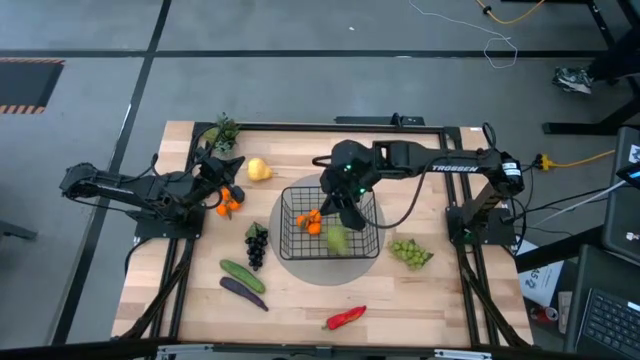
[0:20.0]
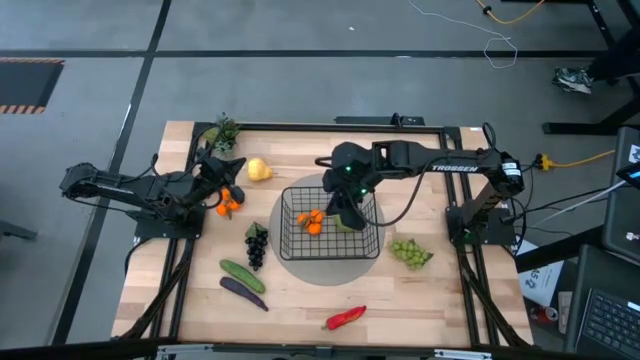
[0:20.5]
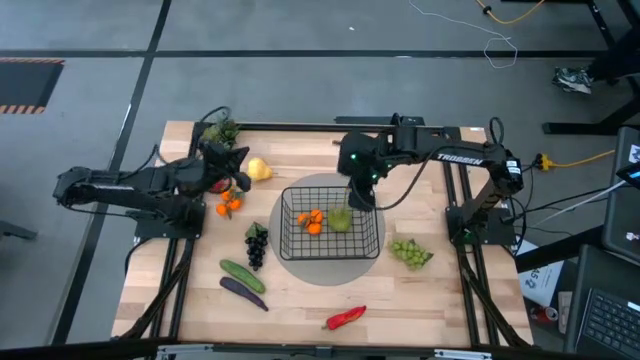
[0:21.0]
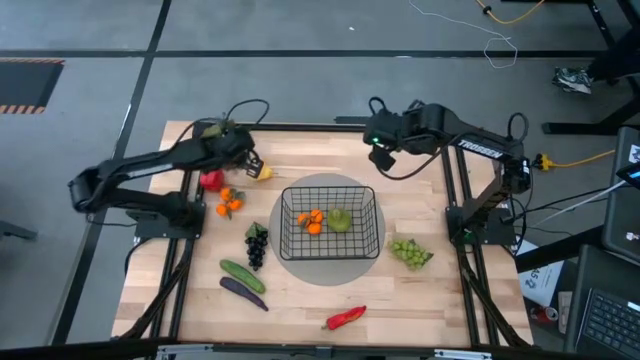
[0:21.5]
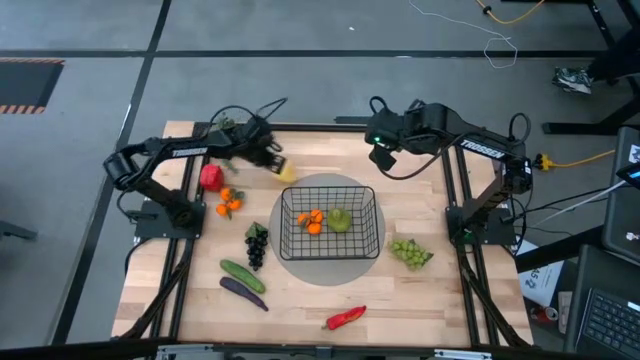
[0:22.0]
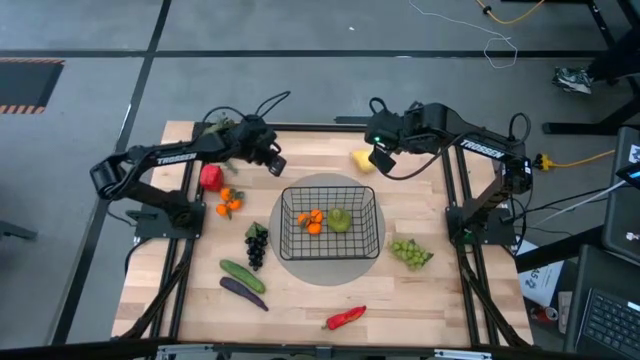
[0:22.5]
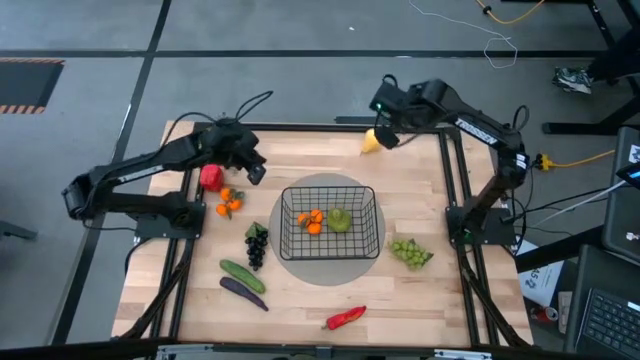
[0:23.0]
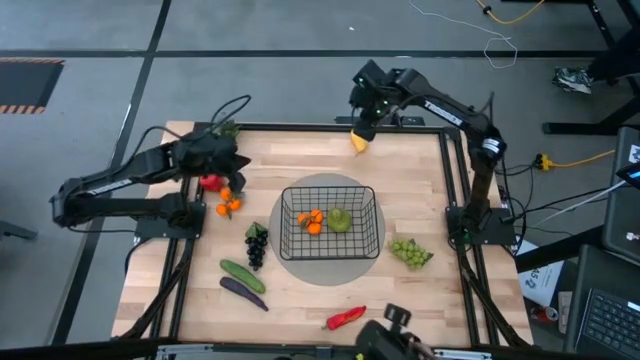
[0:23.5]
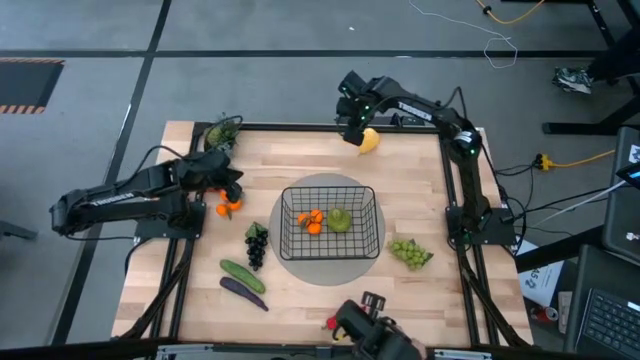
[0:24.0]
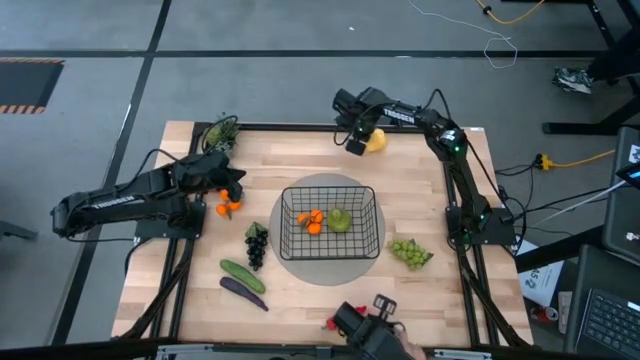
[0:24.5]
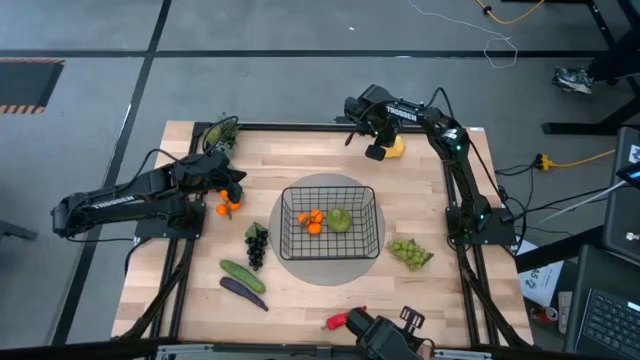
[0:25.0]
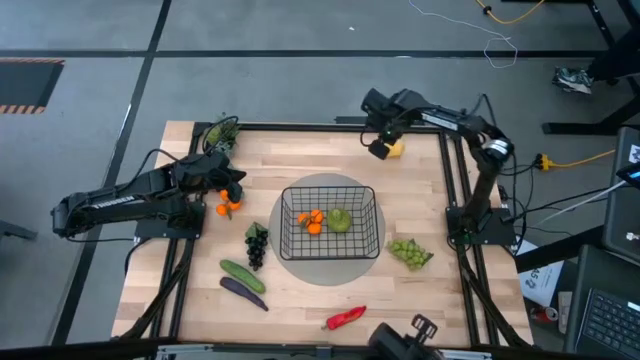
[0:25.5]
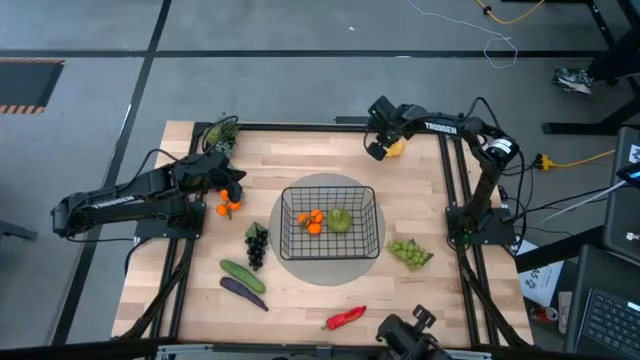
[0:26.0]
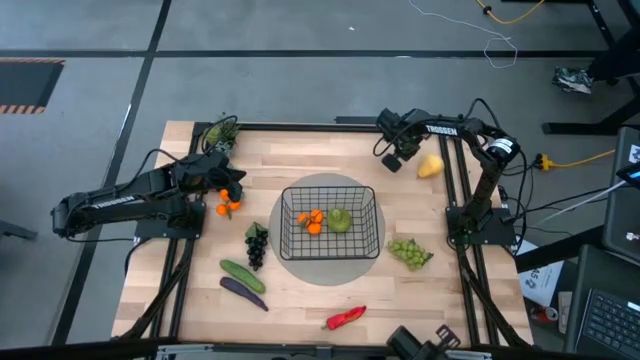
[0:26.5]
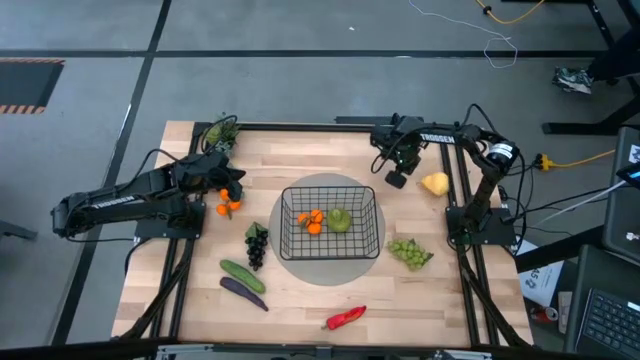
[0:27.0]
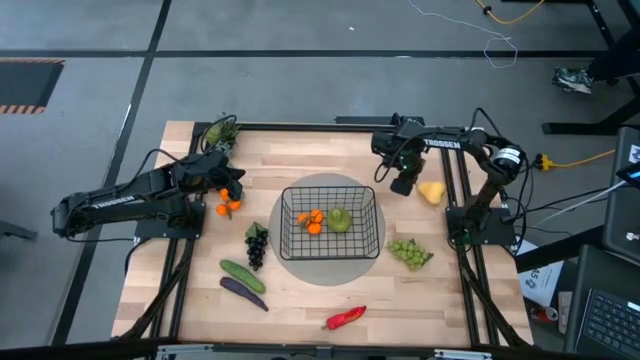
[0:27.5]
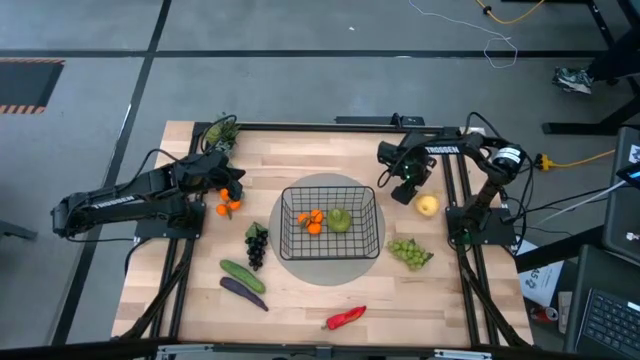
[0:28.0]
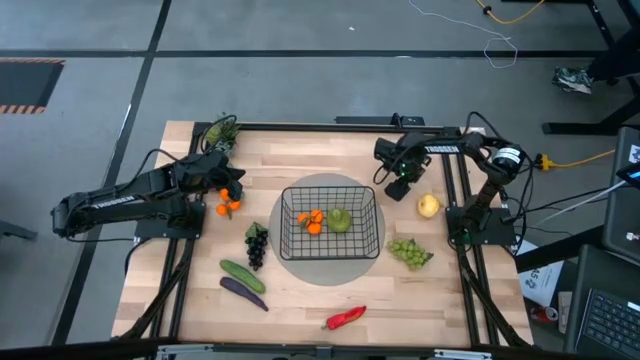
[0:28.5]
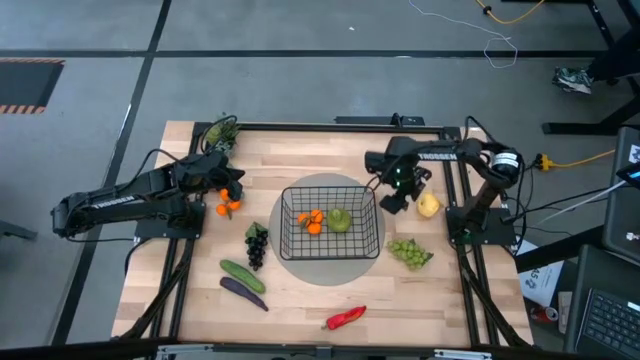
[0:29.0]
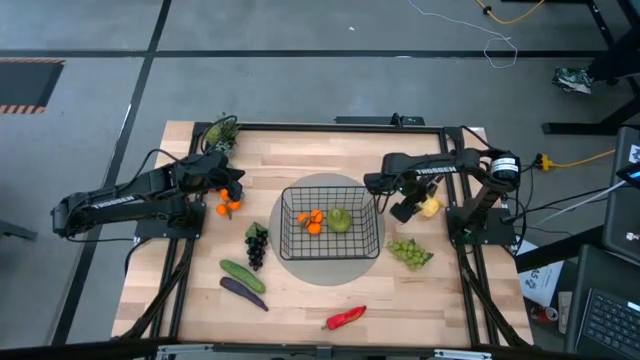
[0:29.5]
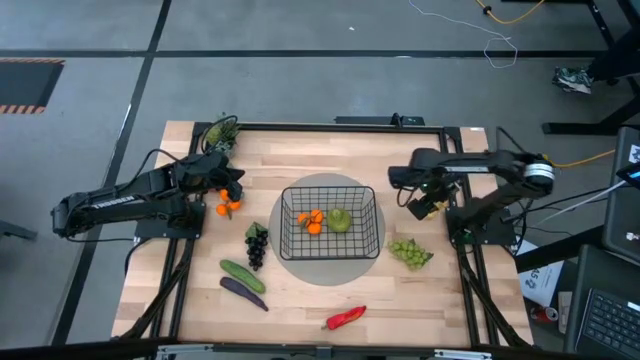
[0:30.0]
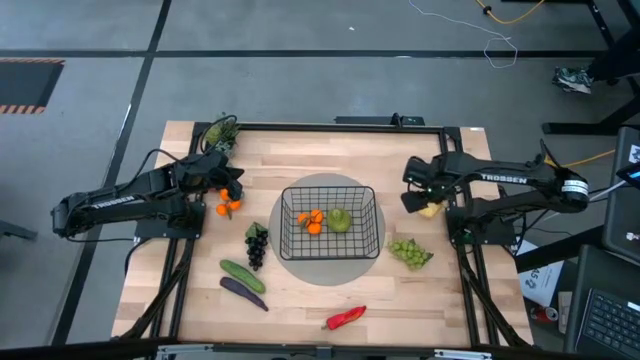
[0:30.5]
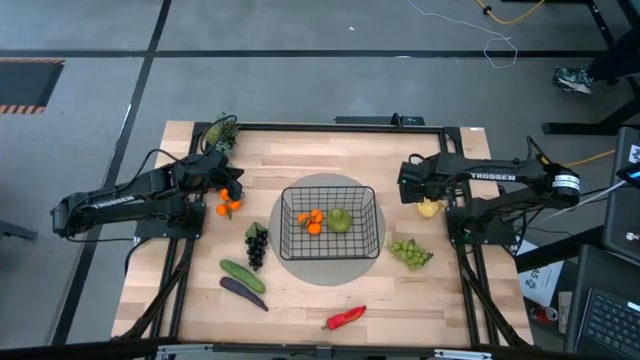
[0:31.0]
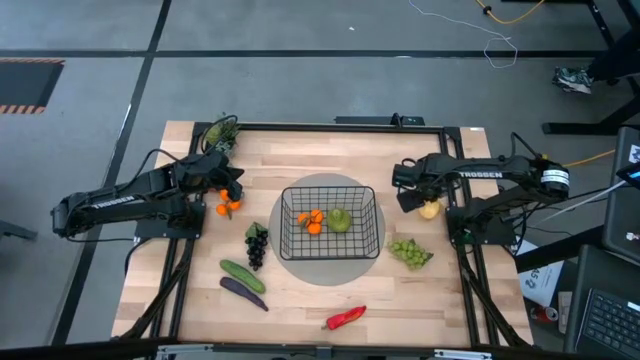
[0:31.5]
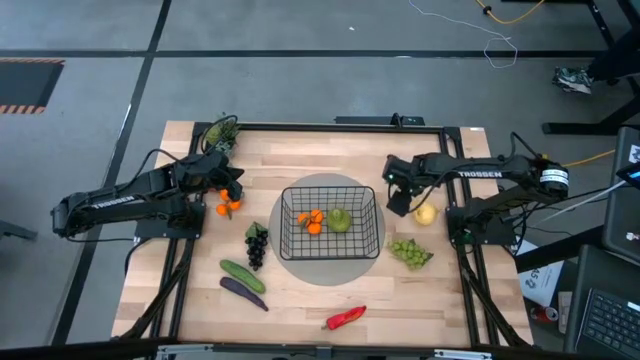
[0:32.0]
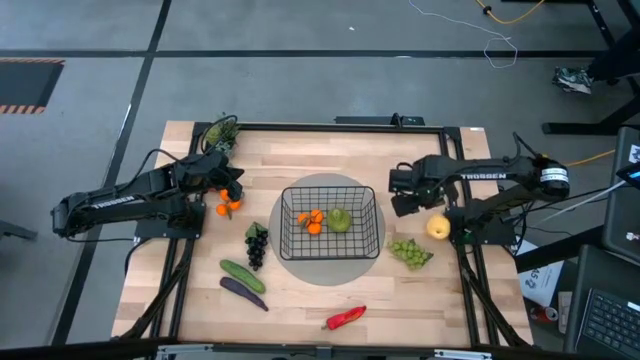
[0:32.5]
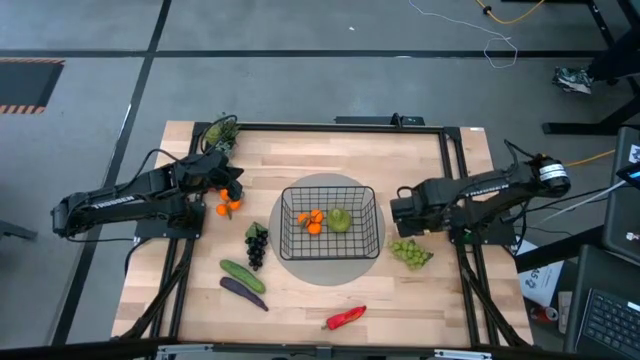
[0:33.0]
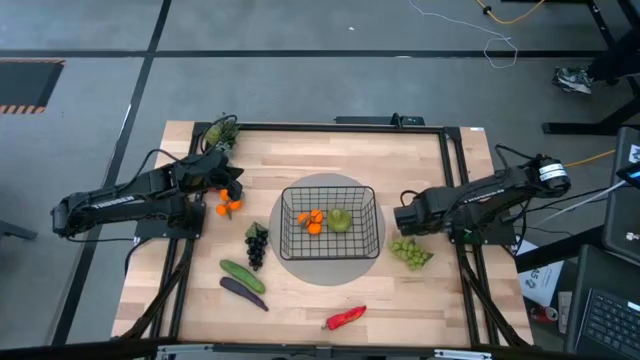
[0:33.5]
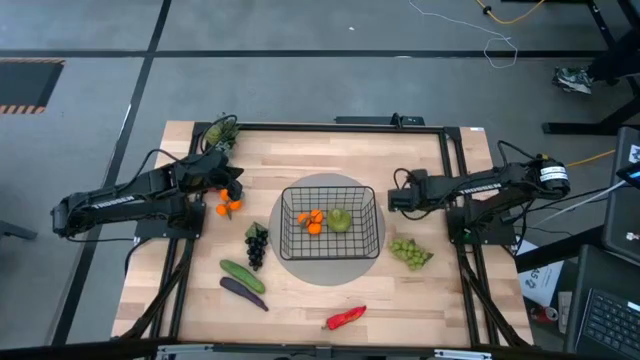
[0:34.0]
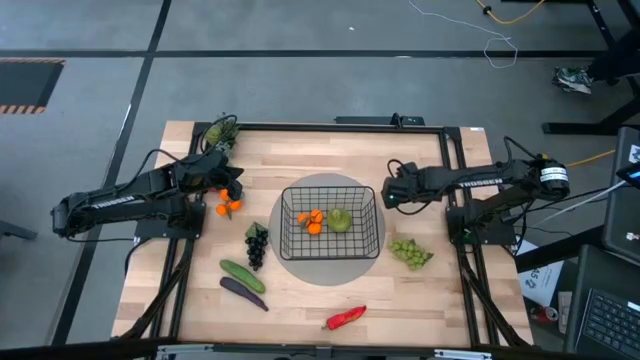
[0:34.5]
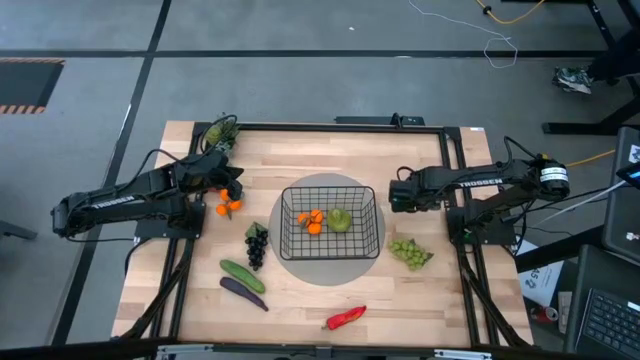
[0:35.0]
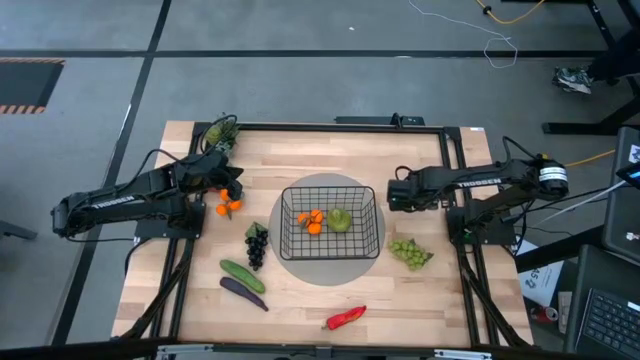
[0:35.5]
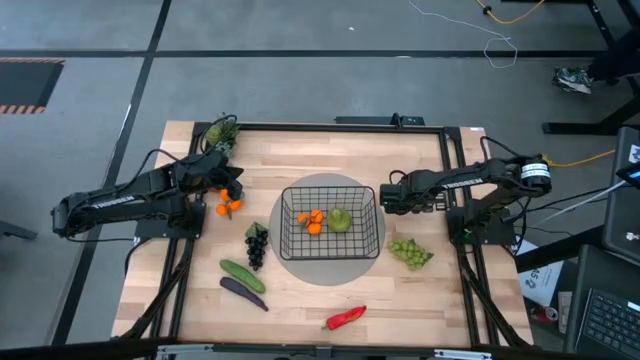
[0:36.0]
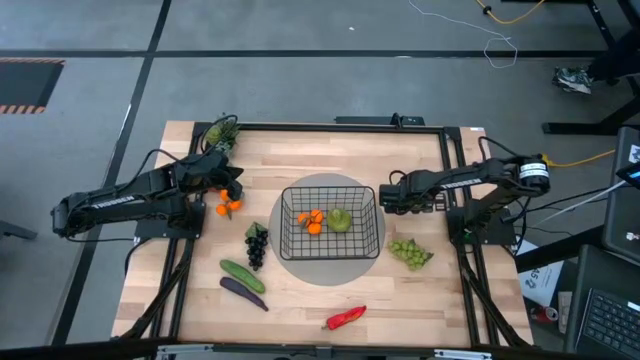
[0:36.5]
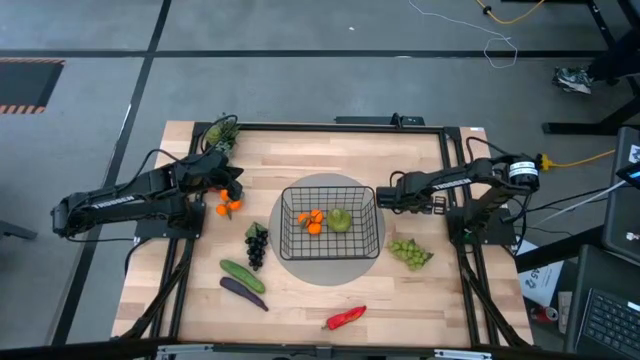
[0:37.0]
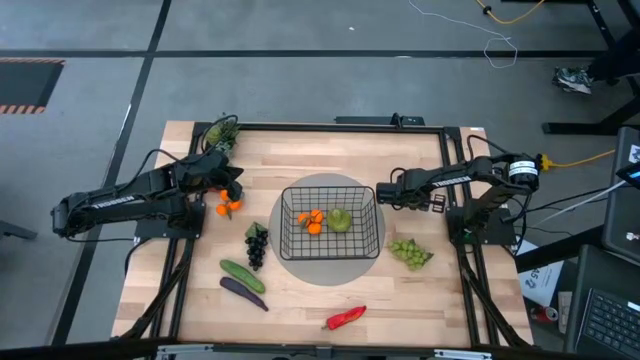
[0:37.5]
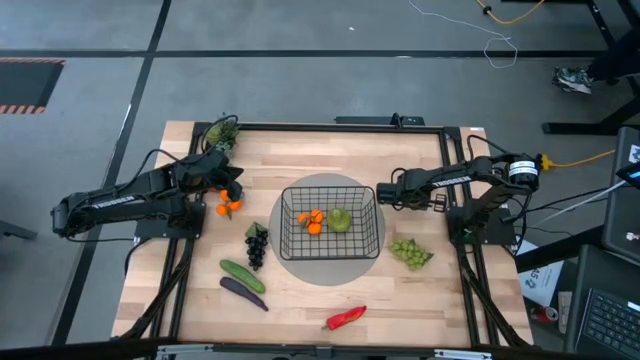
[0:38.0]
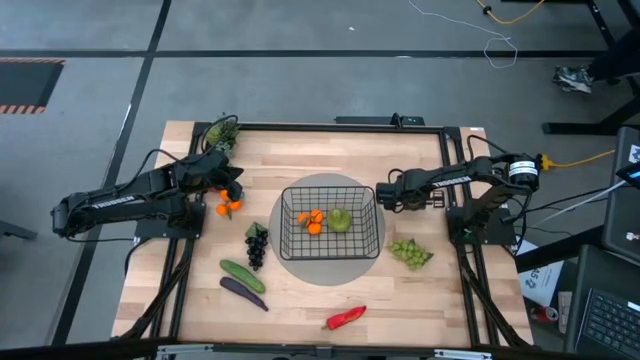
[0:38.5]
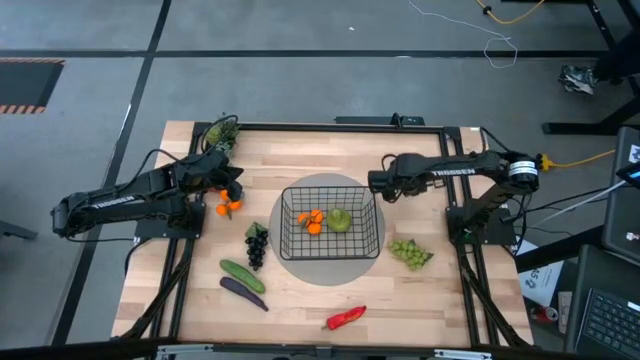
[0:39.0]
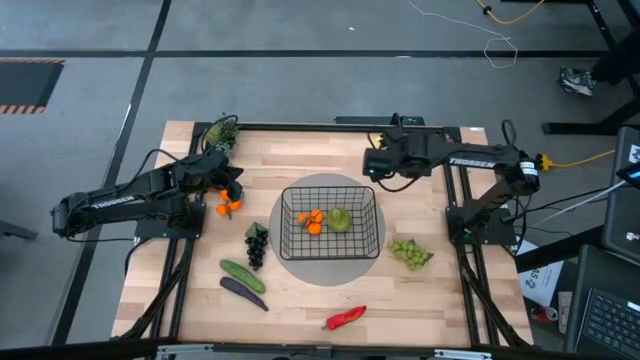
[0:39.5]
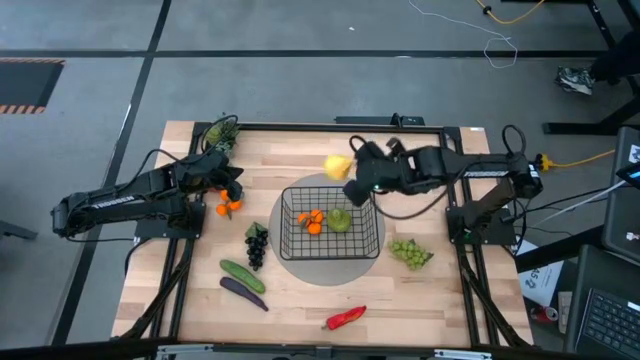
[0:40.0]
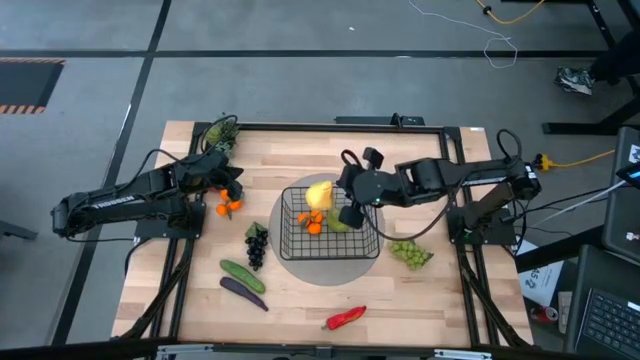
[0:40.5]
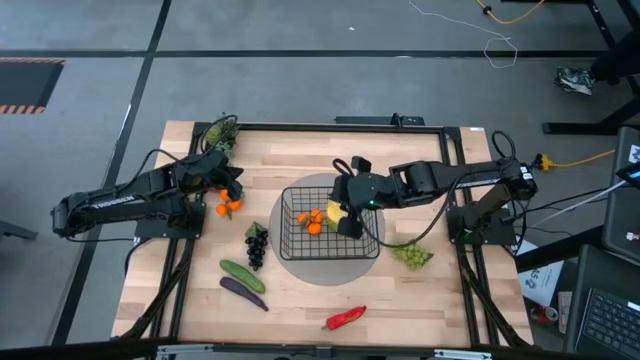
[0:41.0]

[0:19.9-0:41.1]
Task: Build produce basket
Put the yellow pear into the black wire basket
